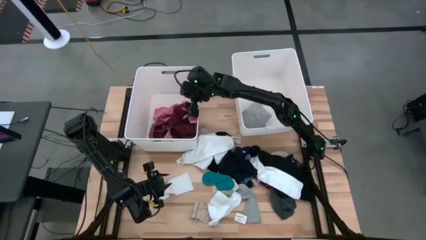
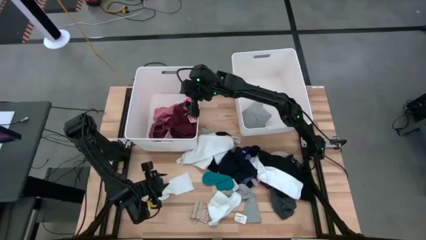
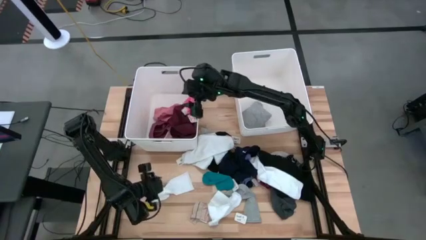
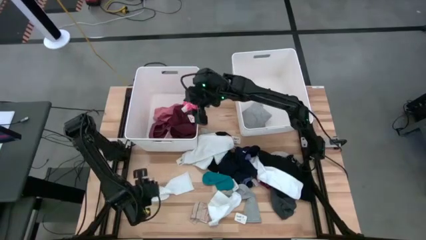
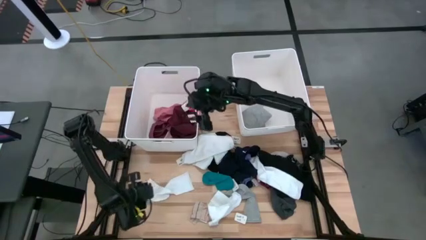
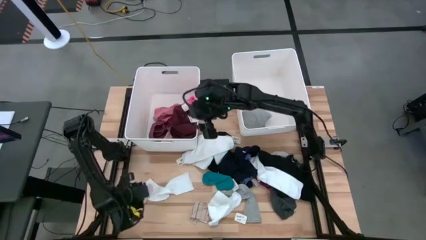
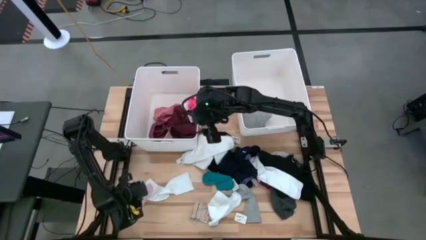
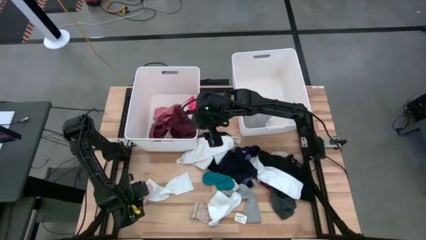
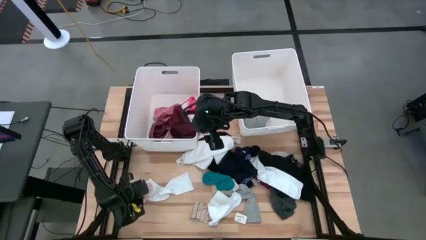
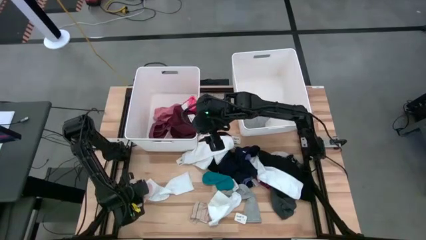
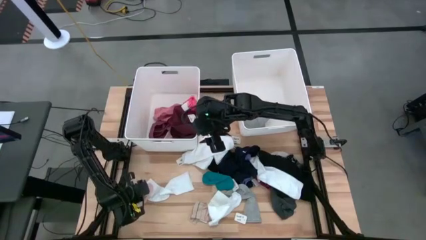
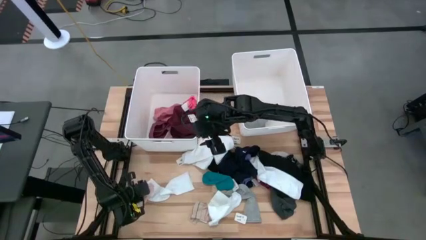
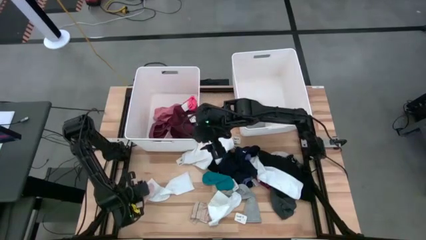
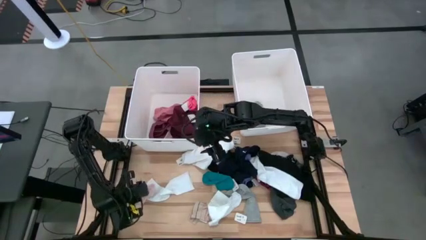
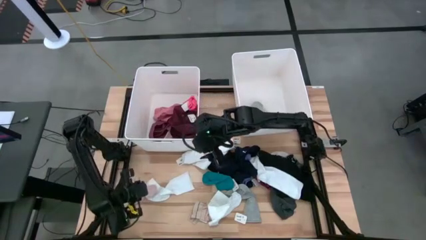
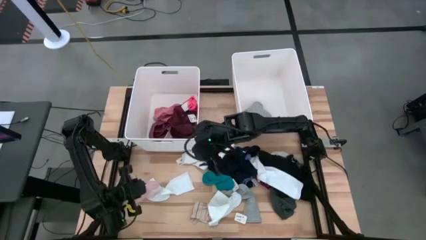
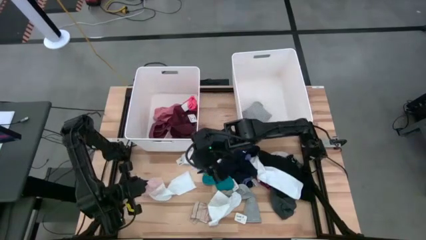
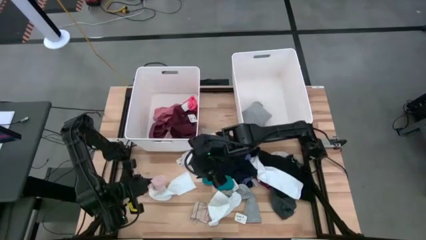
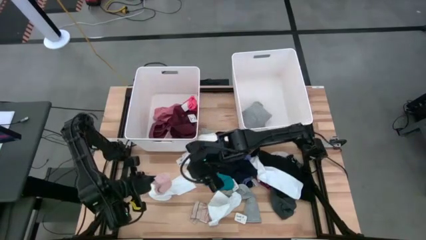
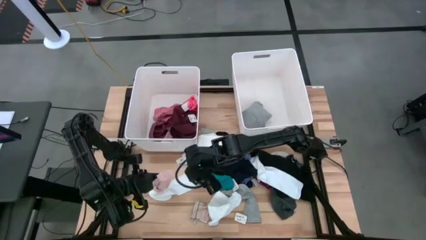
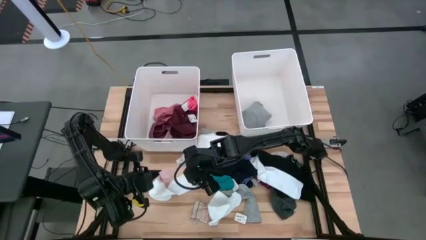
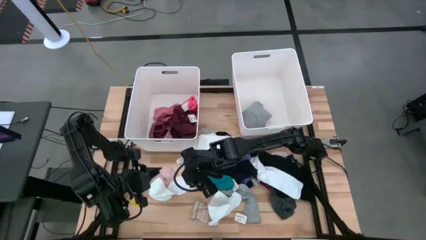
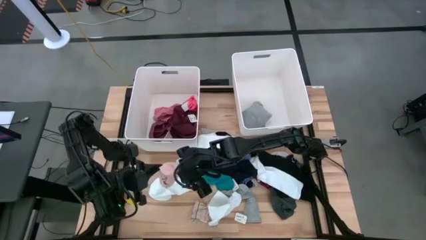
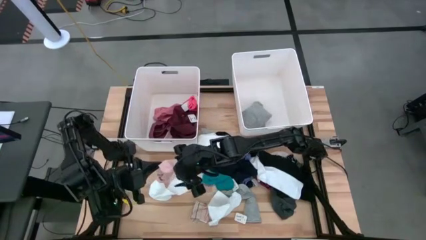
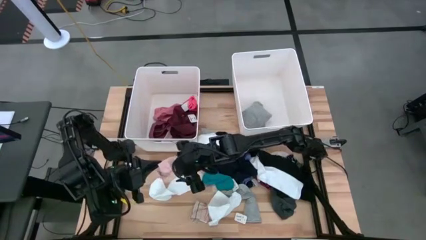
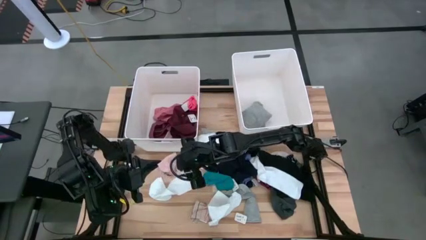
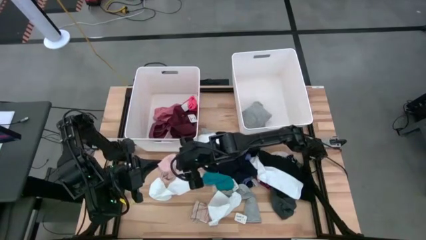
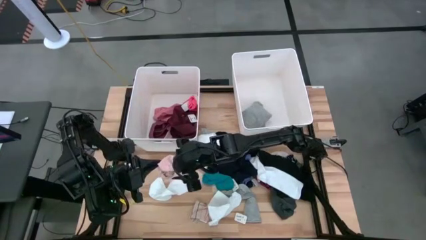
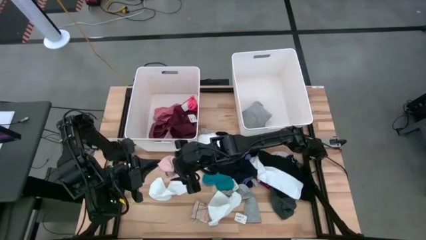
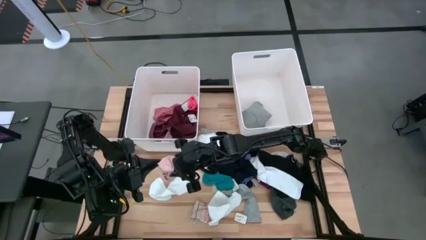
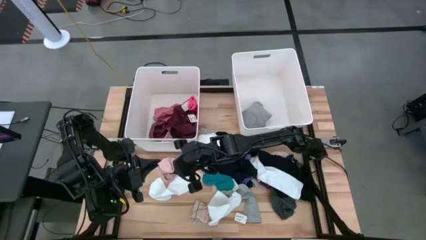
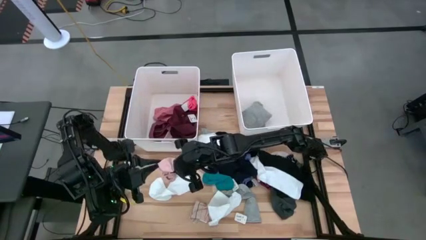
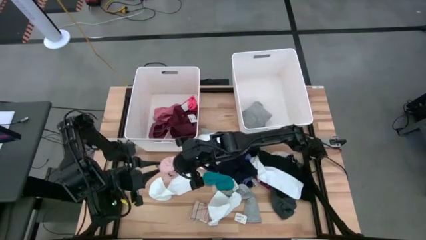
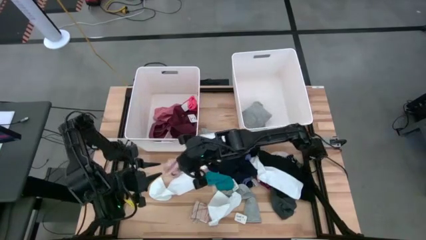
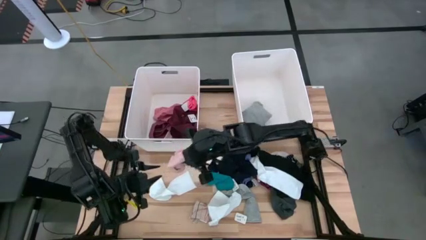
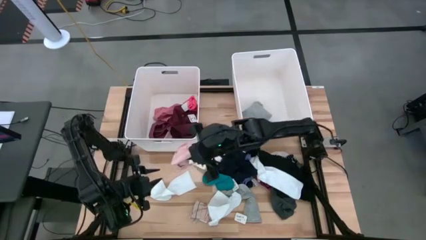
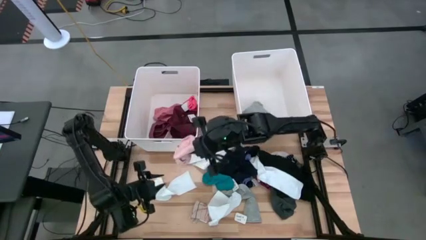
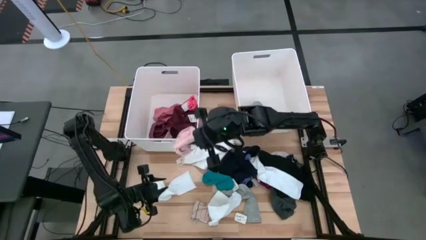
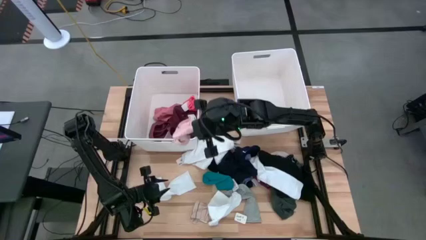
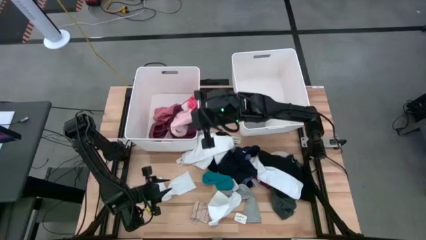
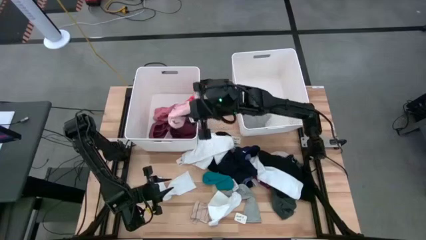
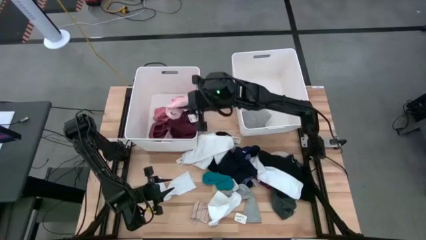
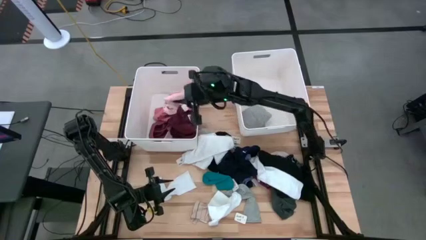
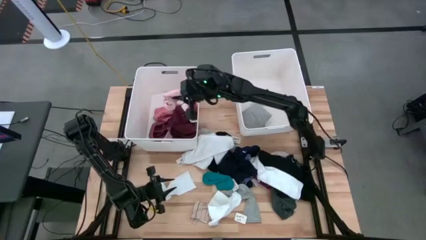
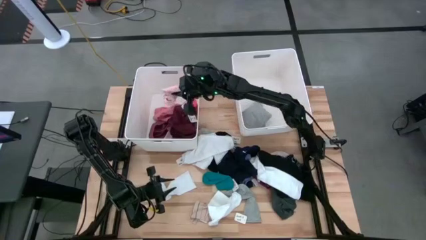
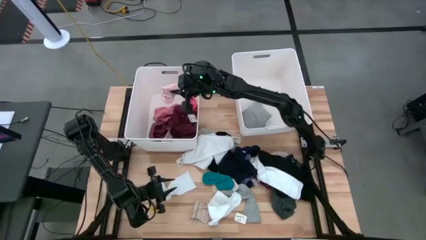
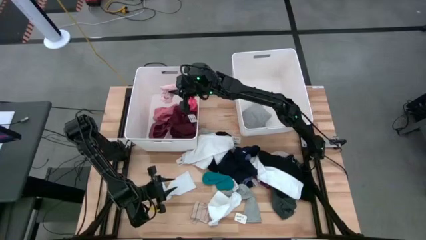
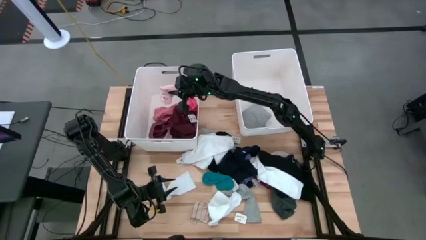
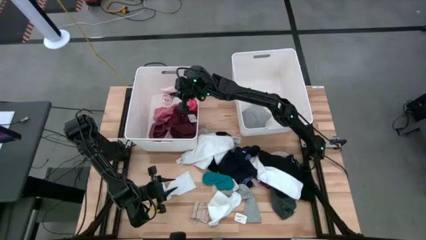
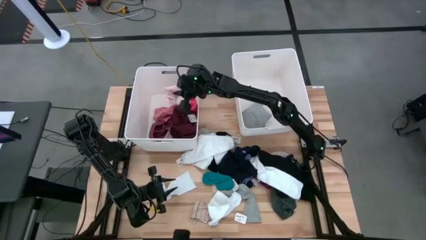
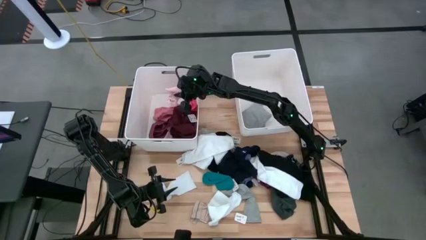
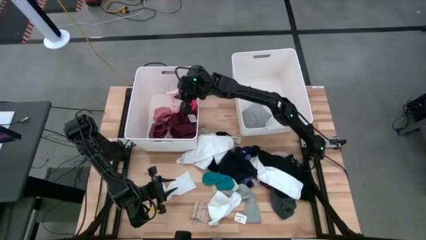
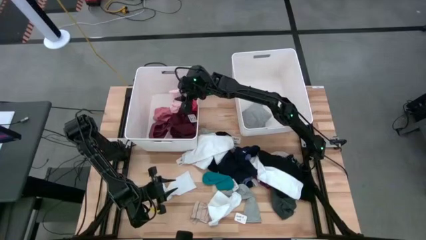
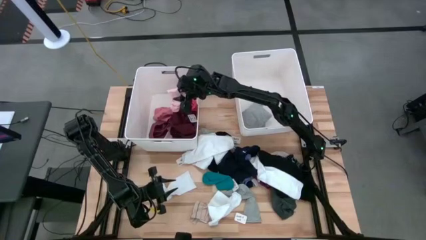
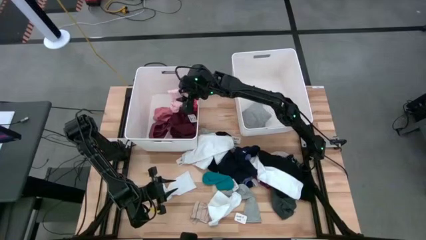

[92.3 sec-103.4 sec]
Task: Sort clothes
Put the light pink sock into the left white bin
